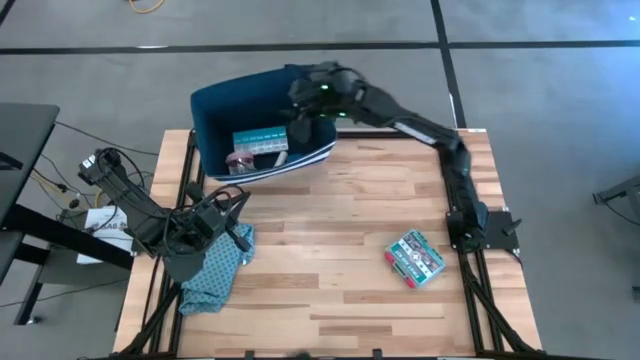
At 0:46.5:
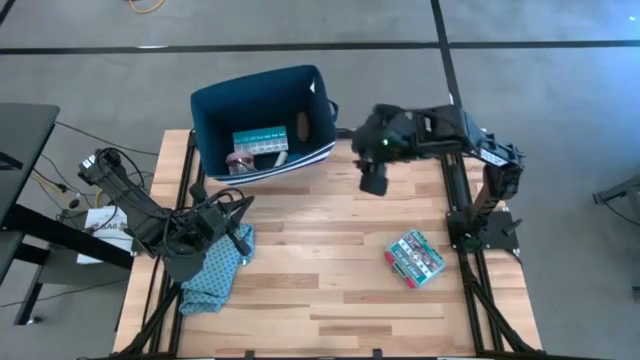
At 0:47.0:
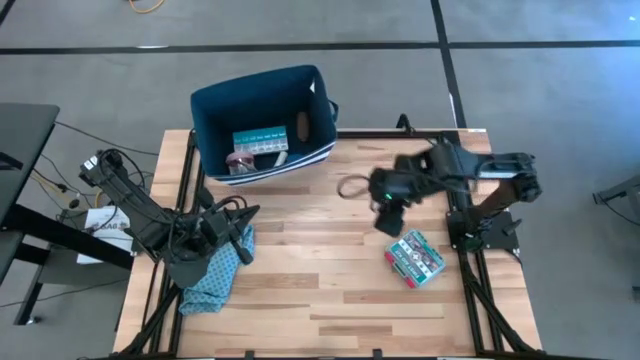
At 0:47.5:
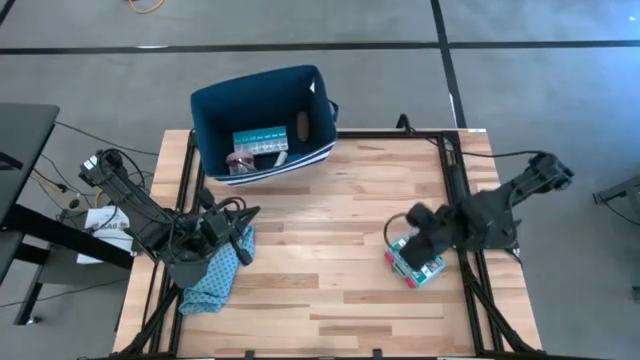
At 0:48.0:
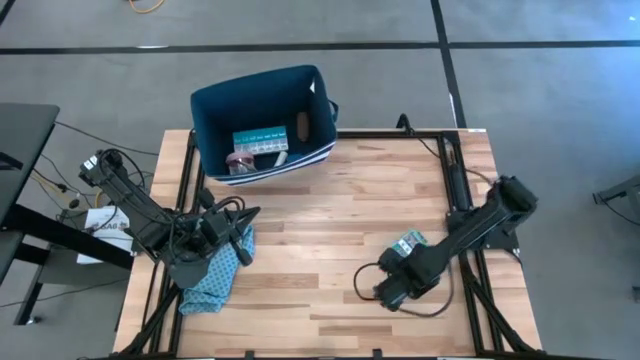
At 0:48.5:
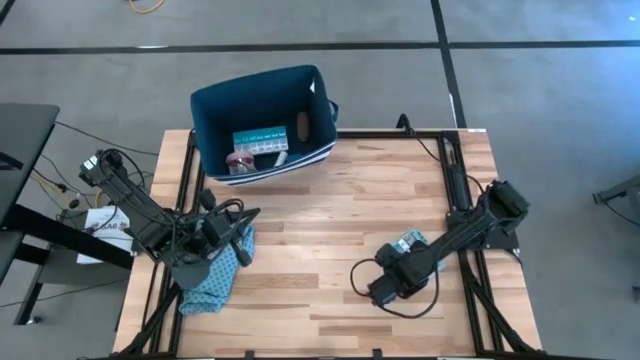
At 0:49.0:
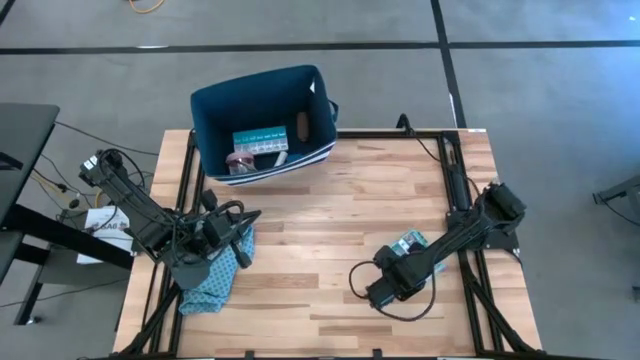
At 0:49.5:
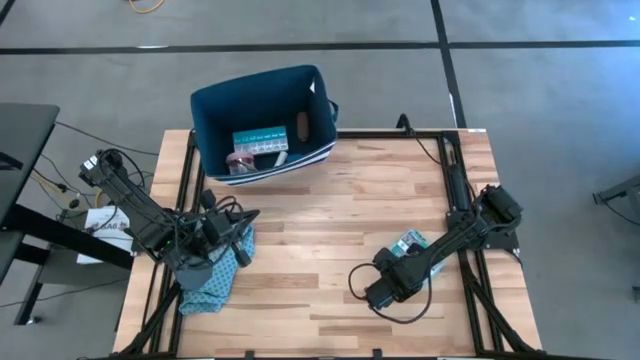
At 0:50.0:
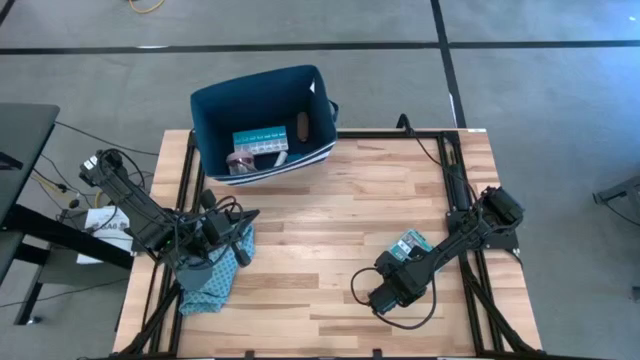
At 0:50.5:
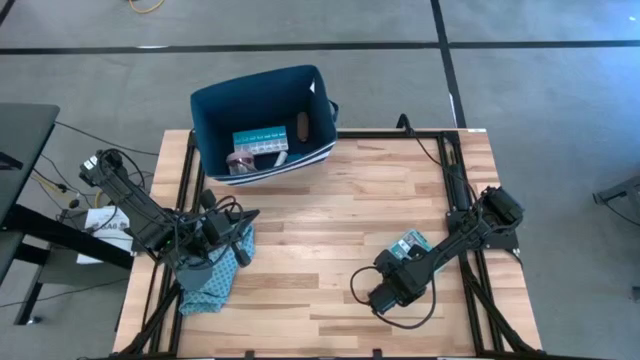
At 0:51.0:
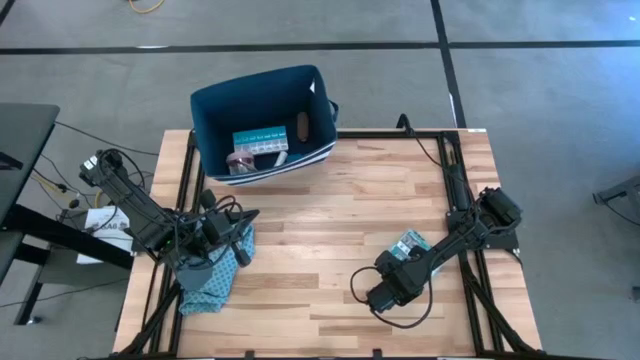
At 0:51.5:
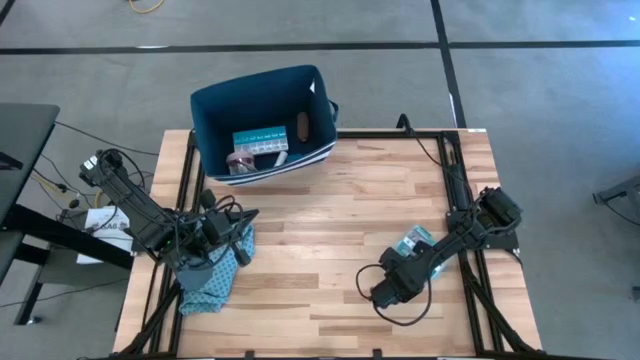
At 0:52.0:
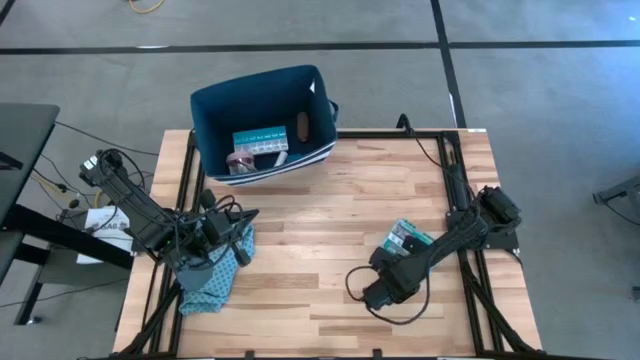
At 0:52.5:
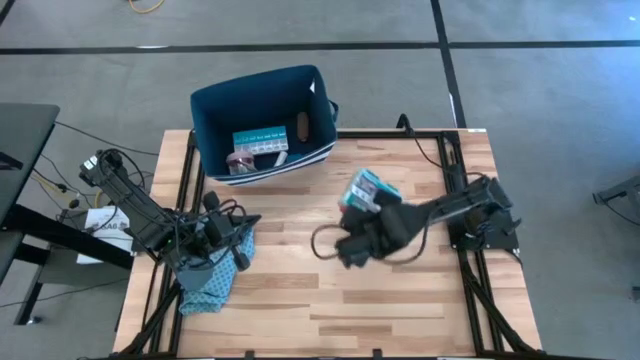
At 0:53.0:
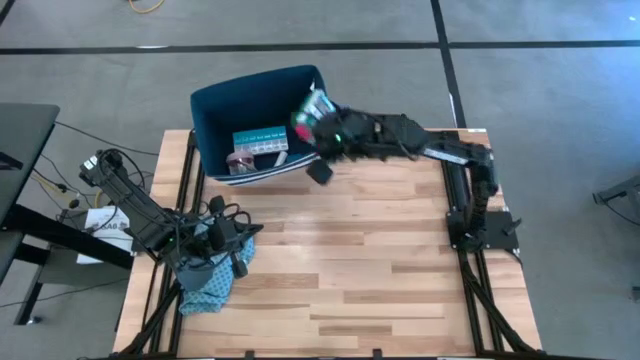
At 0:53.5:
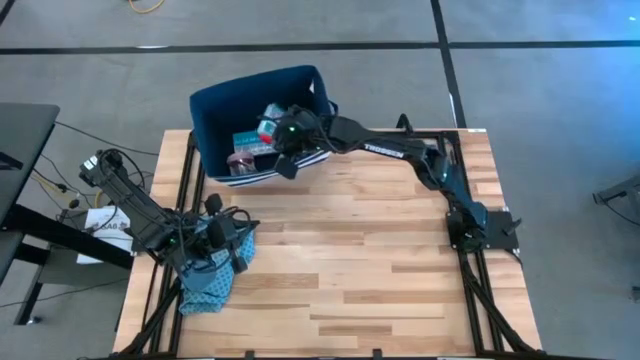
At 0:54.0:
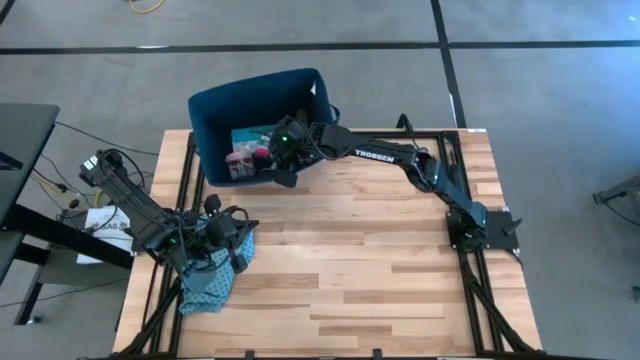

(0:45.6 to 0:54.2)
Task: Pick & place medical supplies in basket/bin
Put the first aid kit into the blue bin

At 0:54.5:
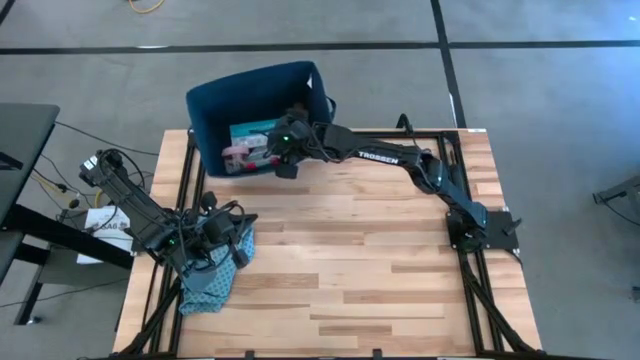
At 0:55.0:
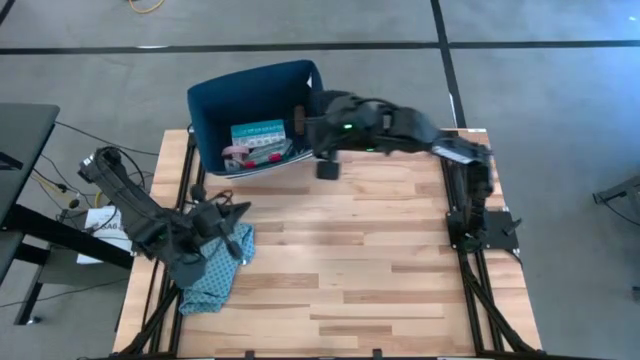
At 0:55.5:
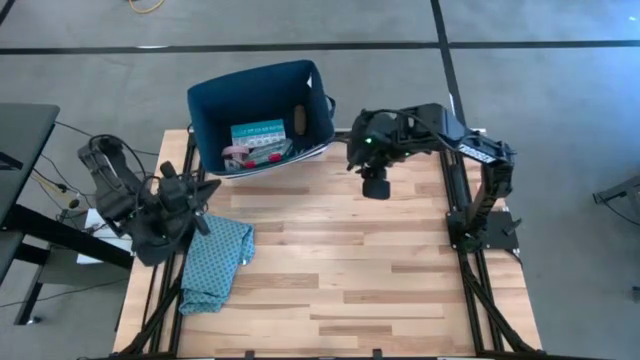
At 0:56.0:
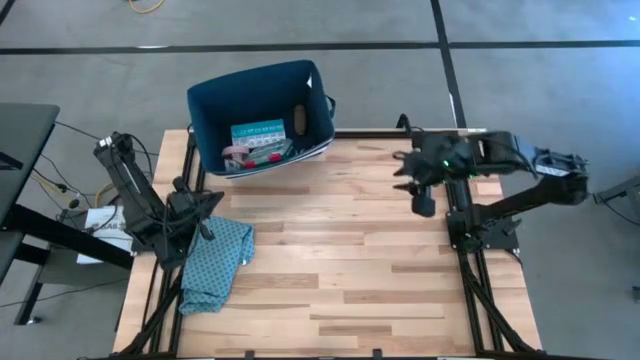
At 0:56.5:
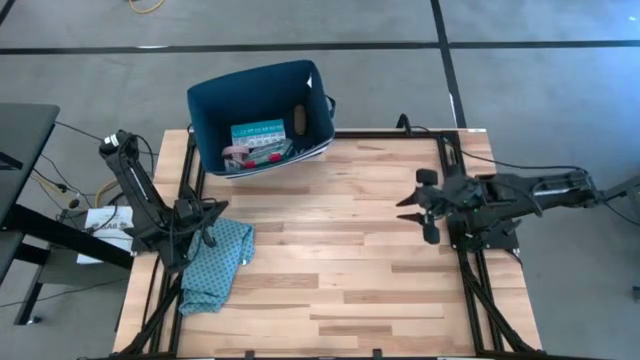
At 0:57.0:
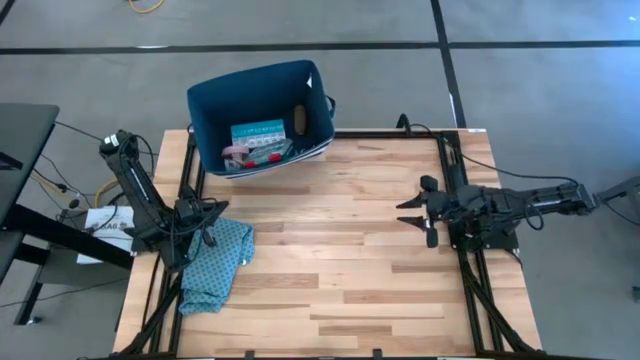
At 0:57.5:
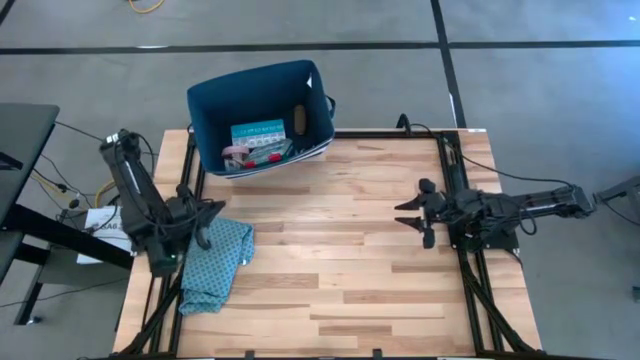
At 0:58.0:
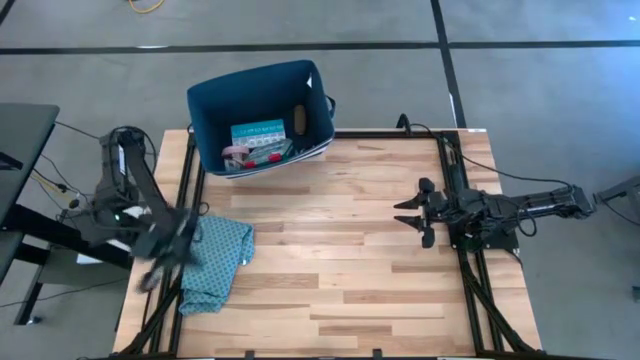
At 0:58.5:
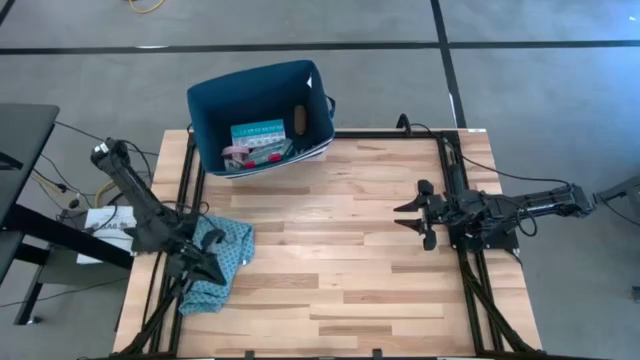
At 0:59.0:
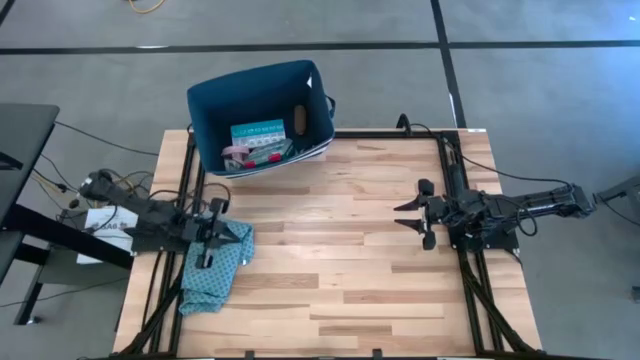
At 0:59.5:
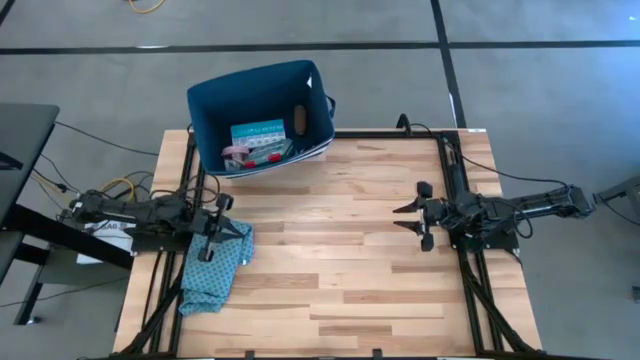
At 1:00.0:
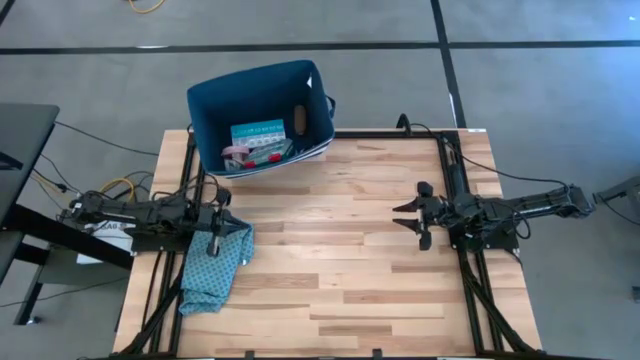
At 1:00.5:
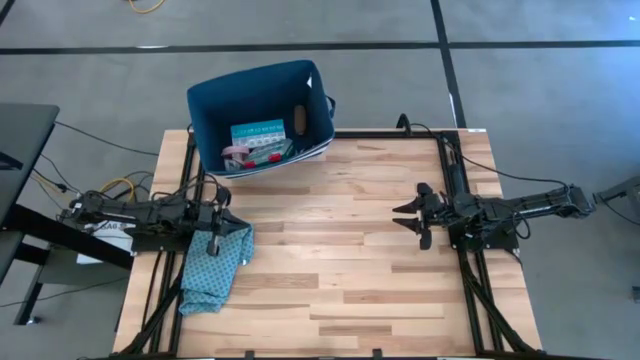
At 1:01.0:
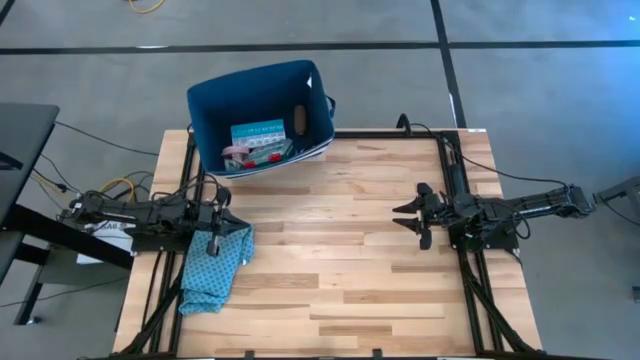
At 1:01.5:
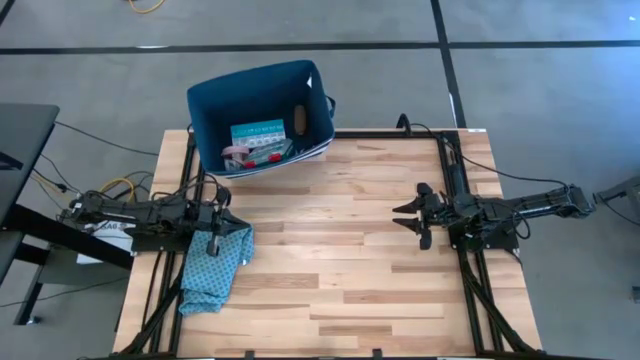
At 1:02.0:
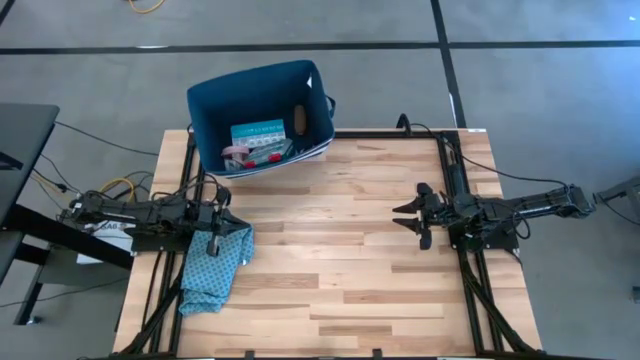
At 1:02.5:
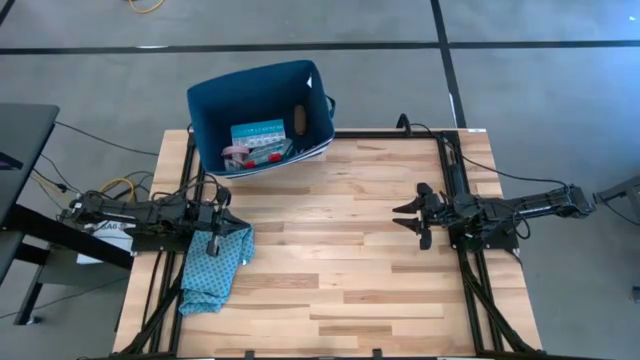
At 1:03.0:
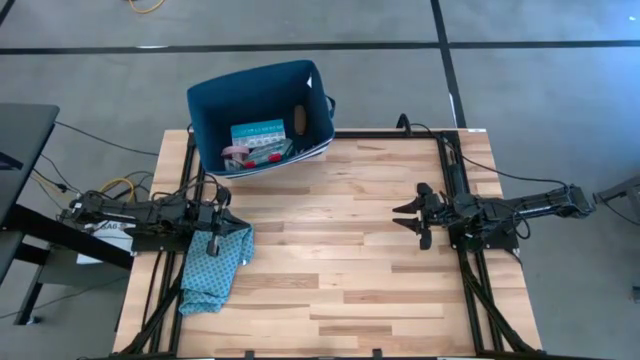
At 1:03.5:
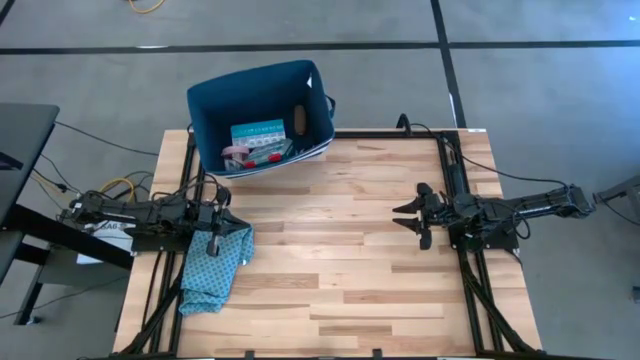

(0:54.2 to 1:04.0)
Return to Home Position

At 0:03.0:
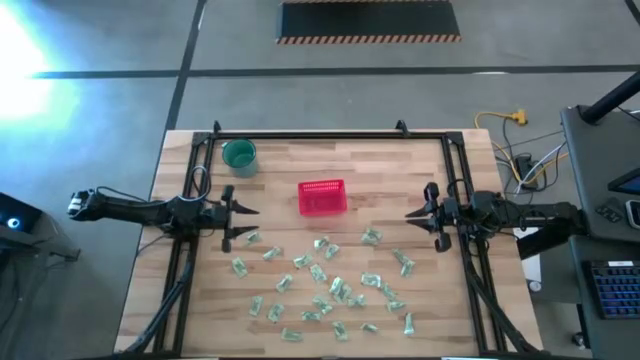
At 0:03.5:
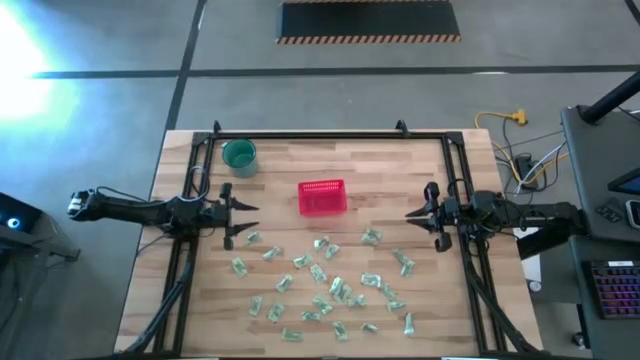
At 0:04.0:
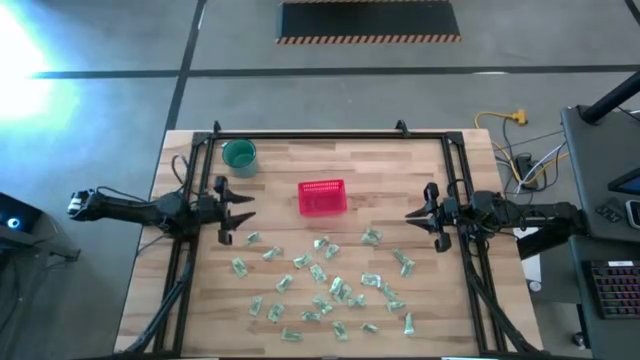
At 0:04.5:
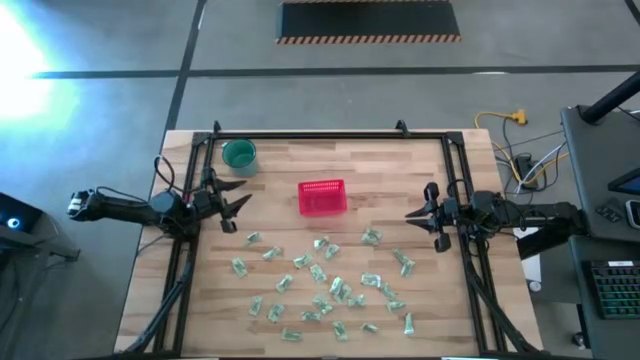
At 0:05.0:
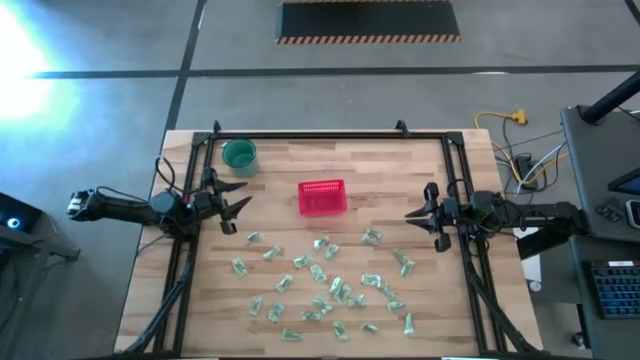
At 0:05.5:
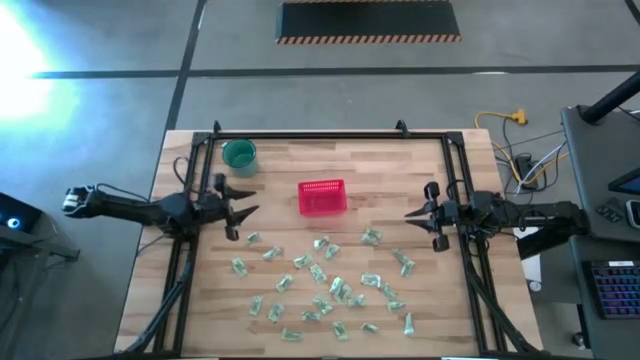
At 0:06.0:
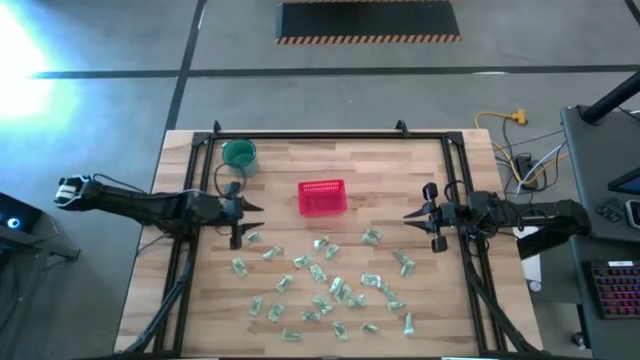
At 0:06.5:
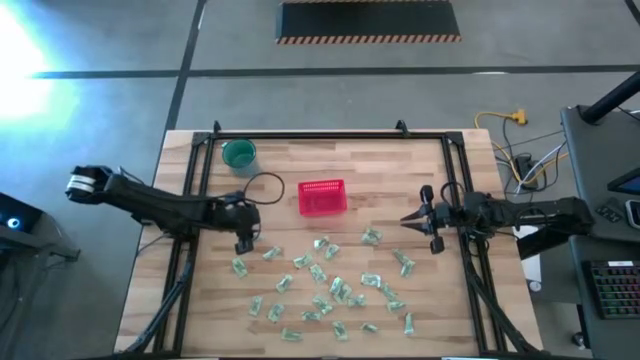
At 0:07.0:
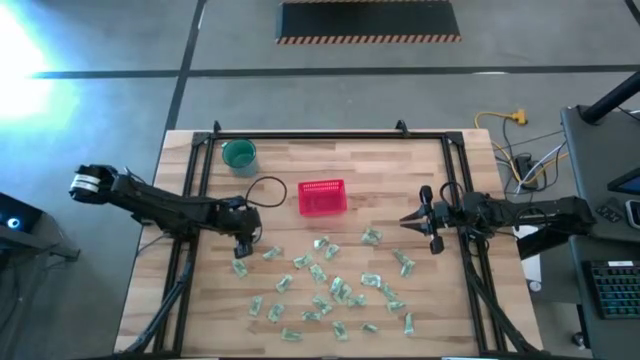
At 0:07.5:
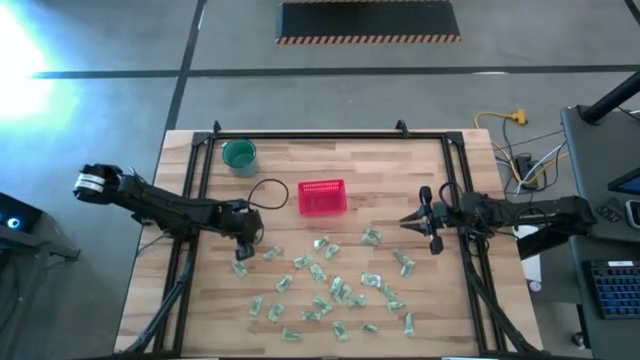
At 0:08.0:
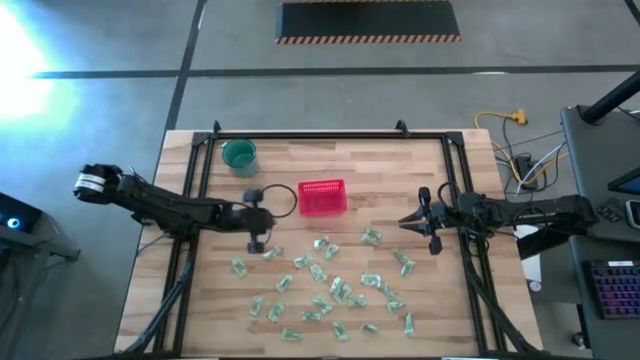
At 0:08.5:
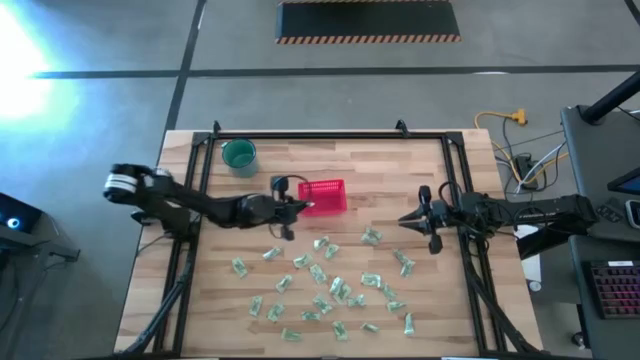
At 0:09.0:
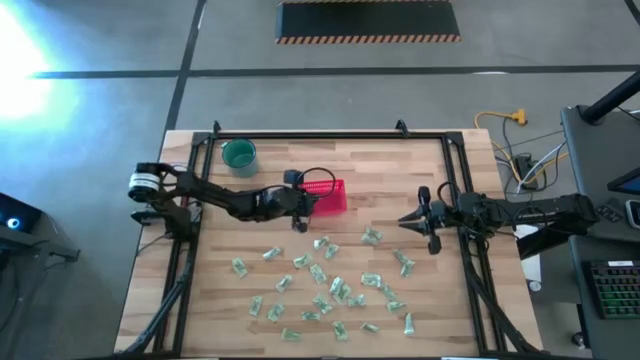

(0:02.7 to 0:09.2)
Task: Pick and place items into bin
Put the stevia packet into the red bin
